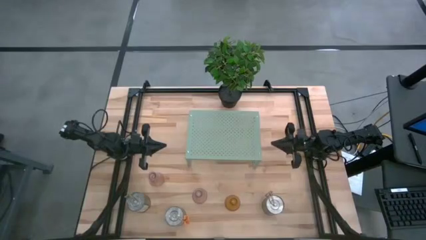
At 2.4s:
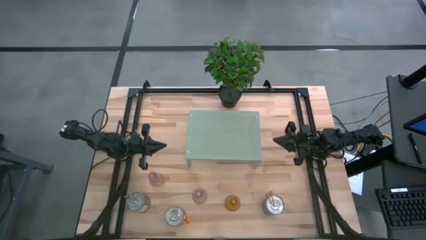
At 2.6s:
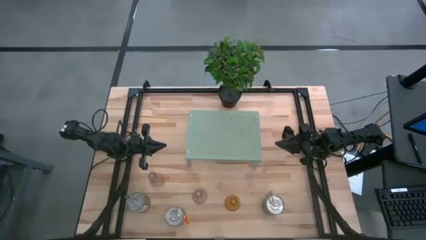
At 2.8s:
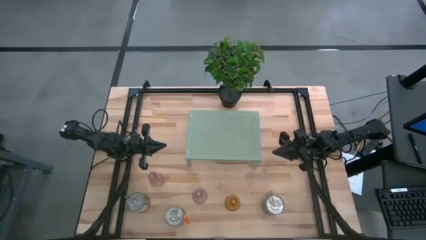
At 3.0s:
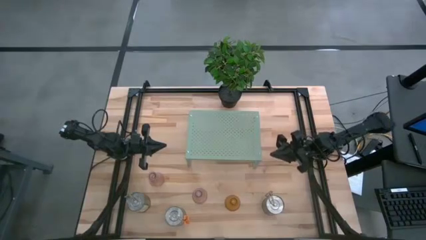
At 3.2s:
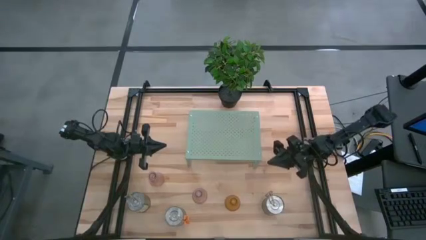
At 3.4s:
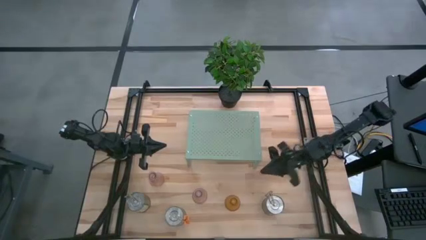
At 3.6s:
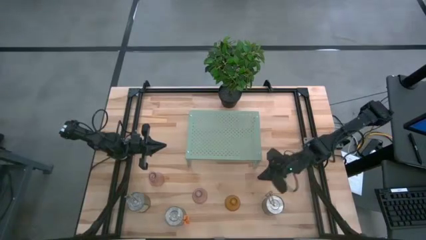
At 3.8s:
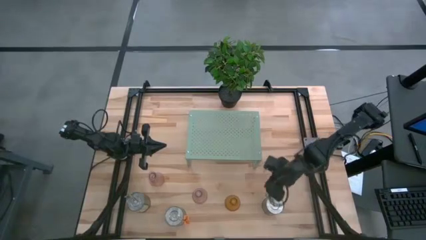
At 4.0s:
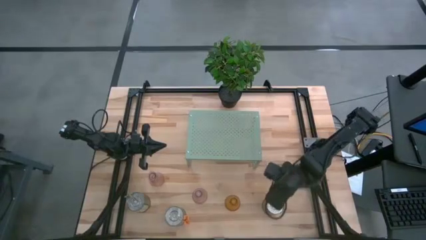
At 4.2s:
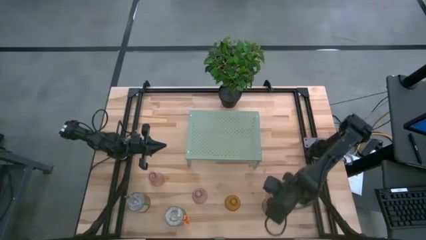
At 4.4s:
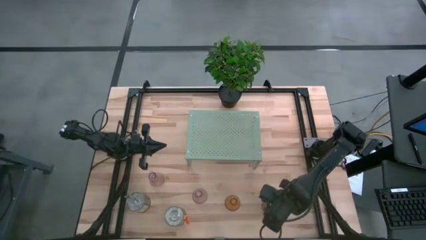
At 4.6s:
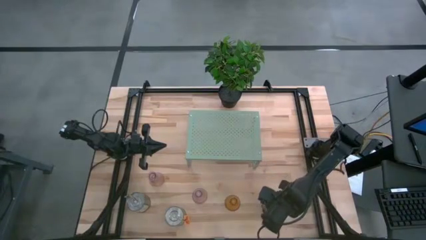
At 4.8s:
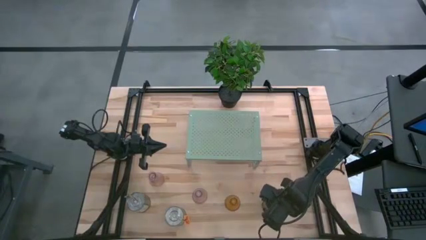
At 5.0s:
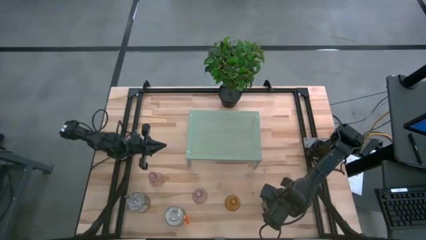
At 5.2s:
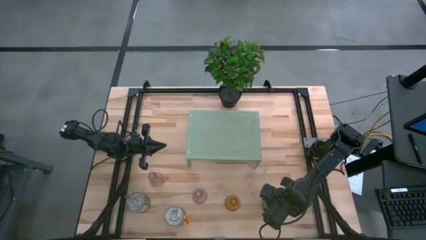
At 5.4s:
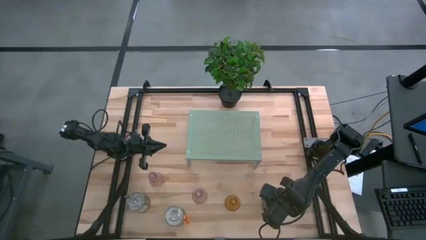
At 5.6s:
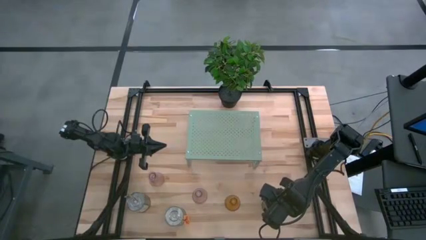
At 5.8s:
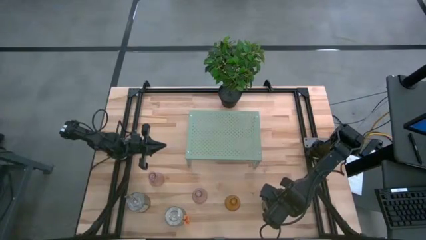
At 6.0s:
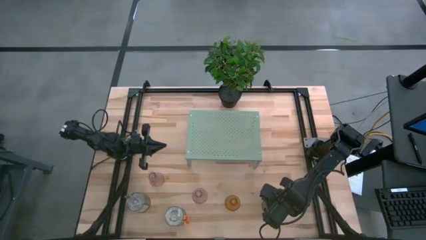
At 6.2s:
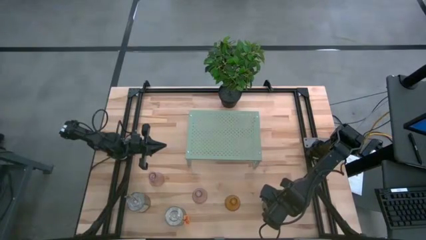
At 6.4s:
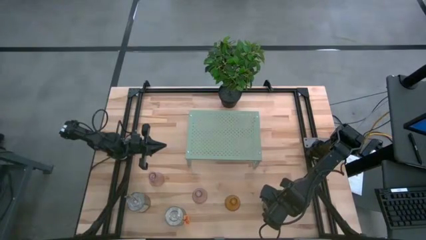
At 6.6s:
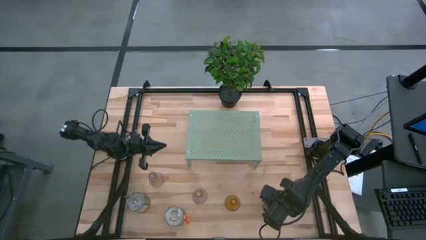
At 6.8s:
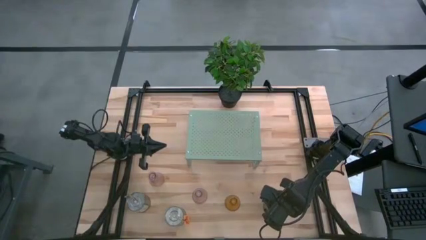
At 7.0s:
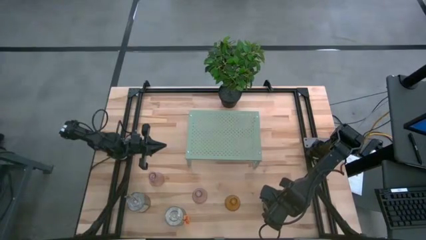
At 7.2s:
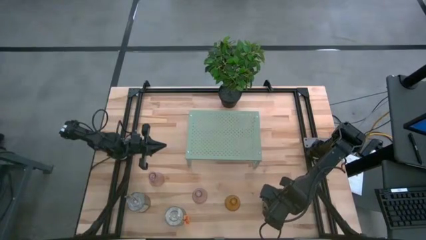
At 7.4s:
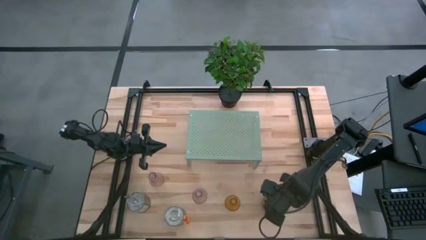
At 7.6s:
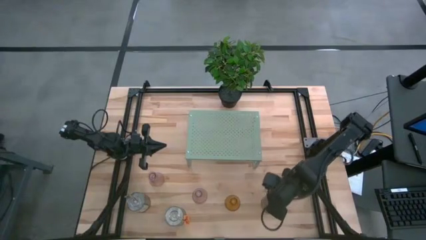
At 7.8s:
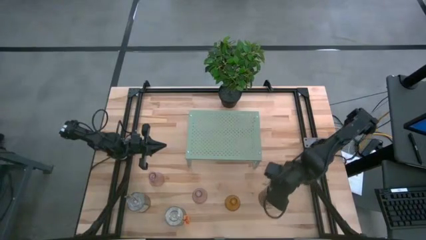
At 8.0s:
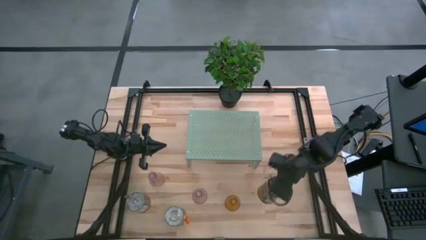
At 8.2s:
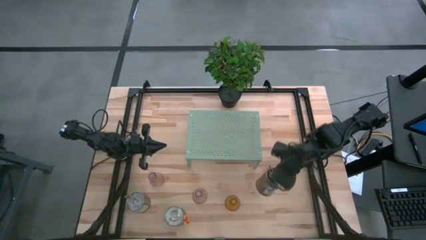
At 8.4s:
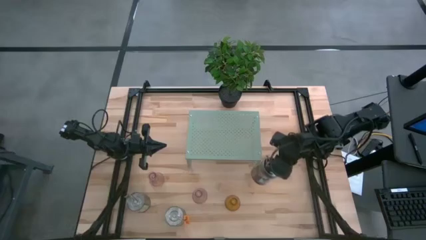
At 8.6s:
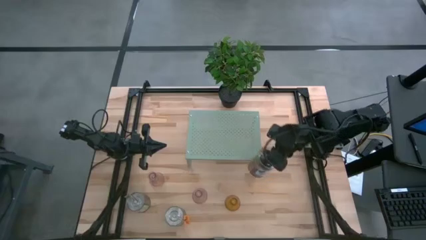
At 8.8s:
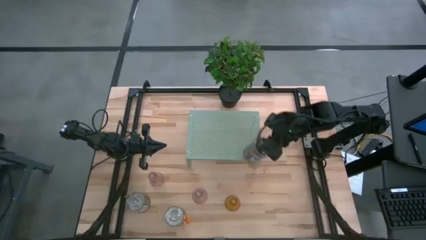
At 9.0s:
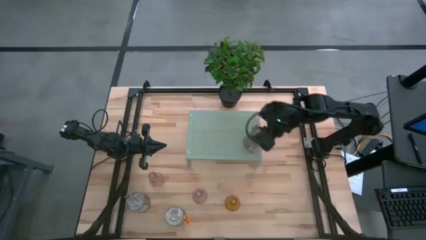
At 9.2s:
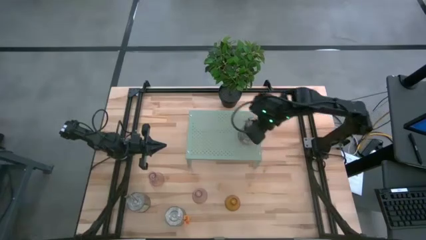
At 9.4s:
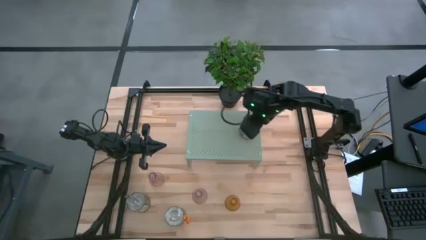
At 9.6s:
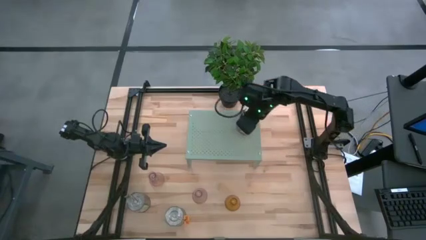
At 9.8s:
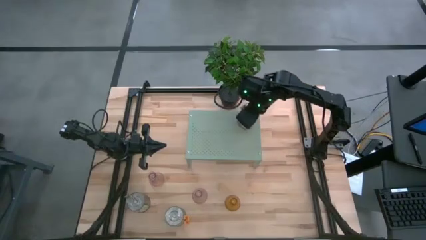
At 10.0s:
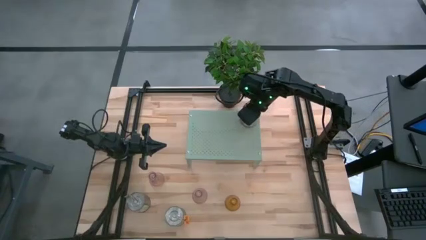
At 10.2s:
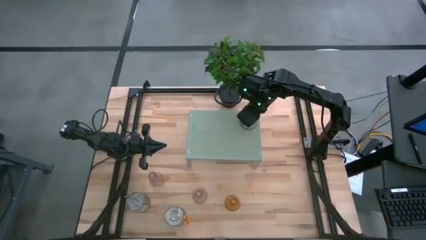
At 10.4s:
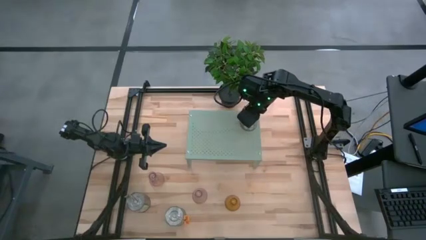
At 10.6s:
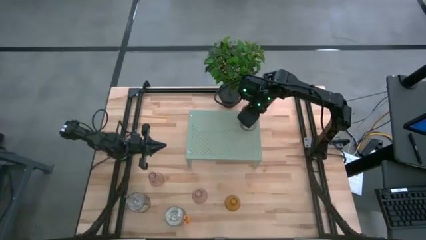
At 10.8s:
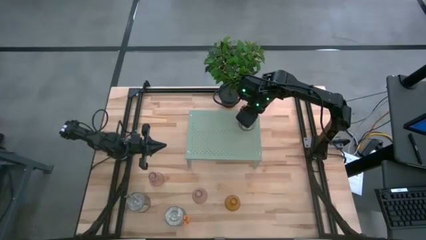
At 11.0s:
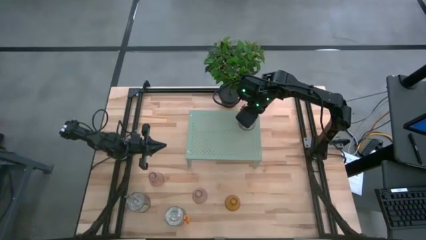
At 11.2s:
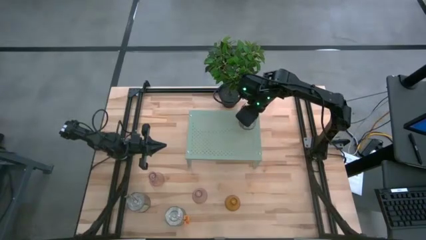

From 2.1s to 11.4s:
Task: Pick & Place candle stick holders
Put the right silver candle on the shelf

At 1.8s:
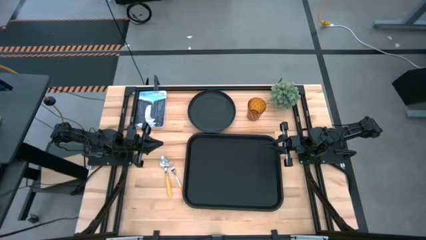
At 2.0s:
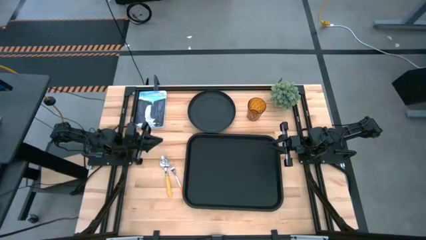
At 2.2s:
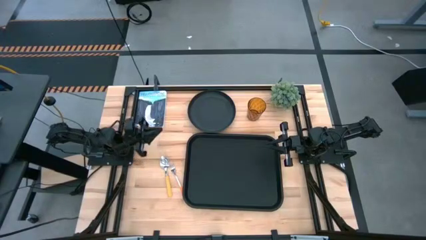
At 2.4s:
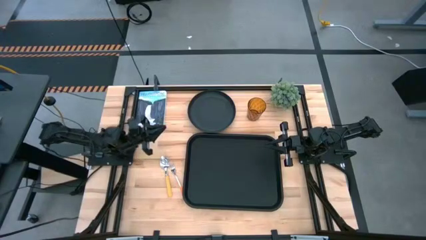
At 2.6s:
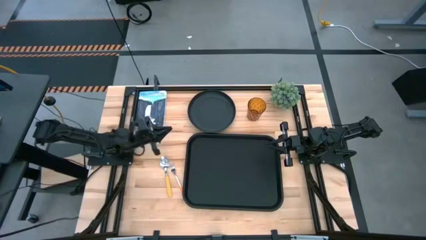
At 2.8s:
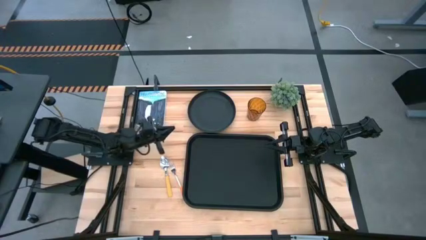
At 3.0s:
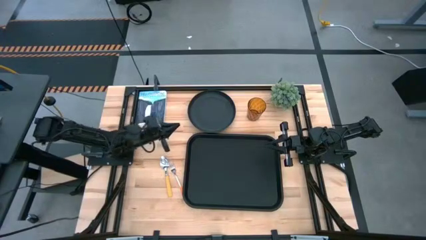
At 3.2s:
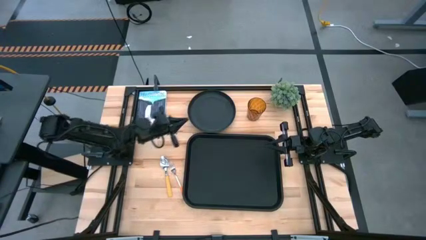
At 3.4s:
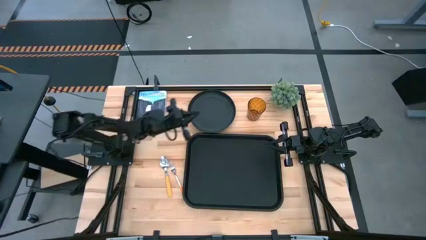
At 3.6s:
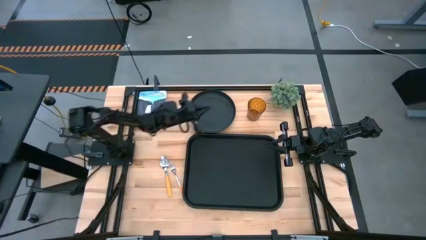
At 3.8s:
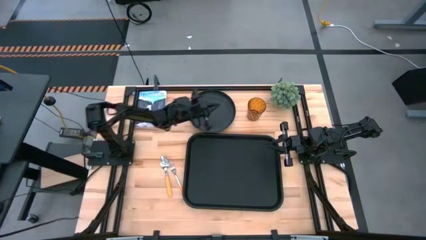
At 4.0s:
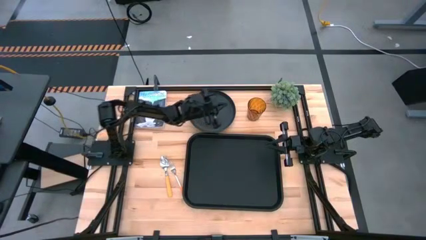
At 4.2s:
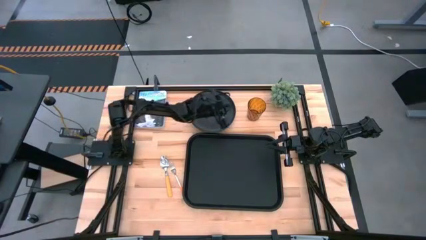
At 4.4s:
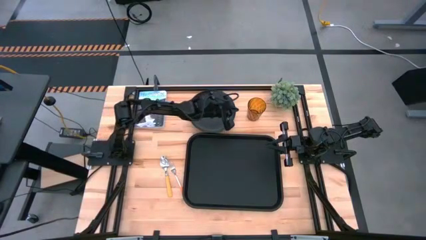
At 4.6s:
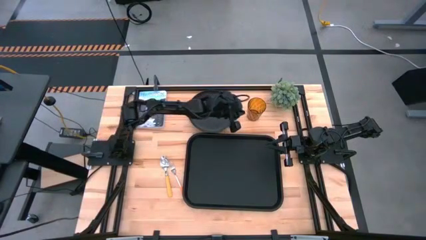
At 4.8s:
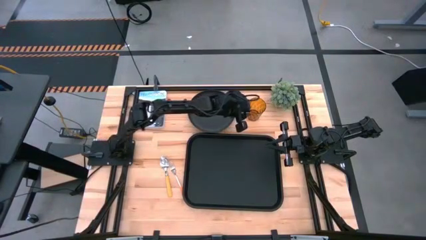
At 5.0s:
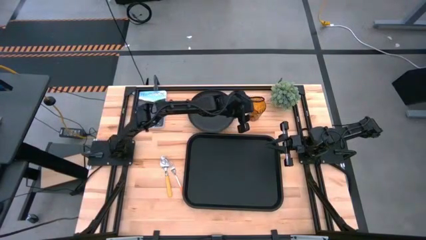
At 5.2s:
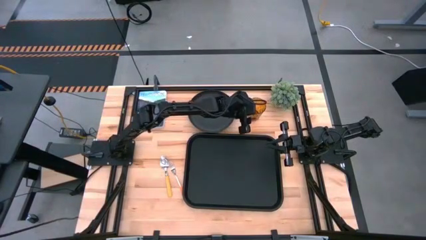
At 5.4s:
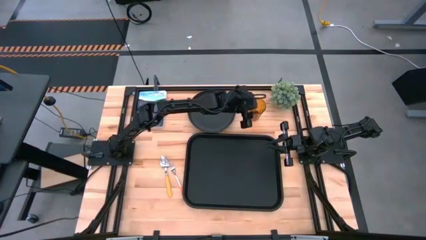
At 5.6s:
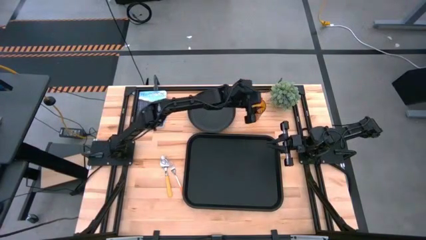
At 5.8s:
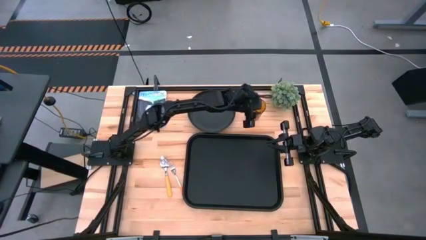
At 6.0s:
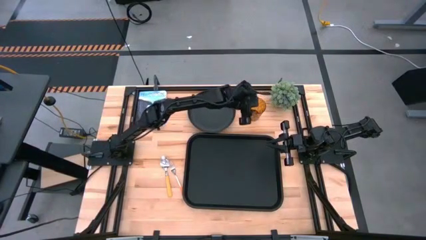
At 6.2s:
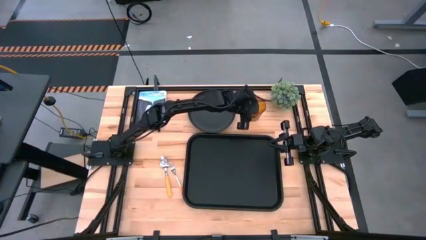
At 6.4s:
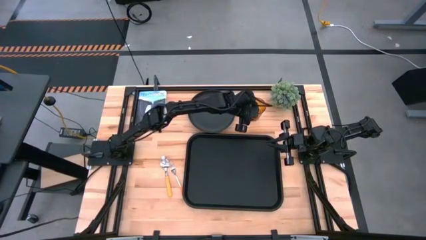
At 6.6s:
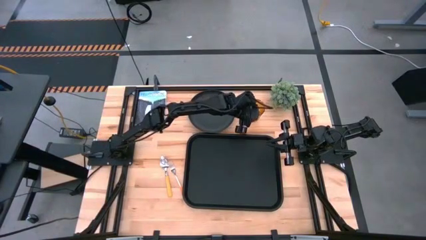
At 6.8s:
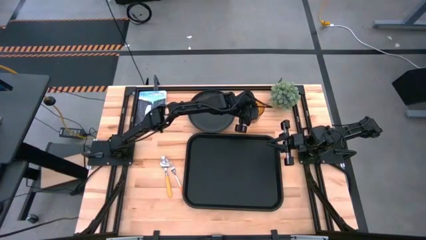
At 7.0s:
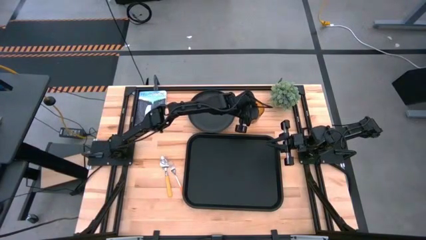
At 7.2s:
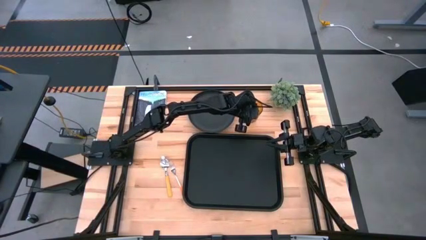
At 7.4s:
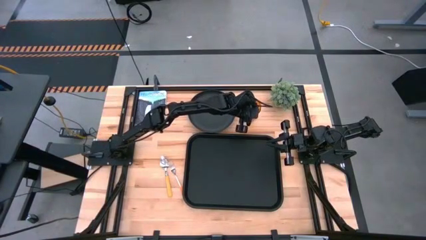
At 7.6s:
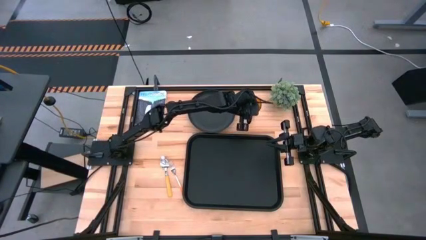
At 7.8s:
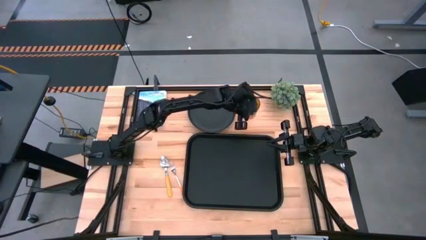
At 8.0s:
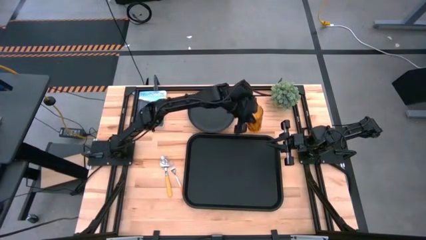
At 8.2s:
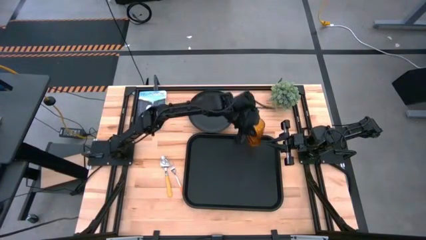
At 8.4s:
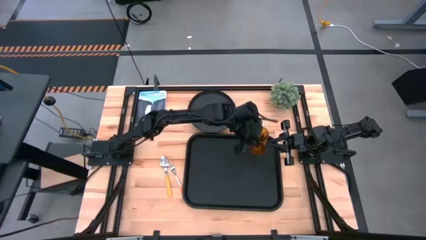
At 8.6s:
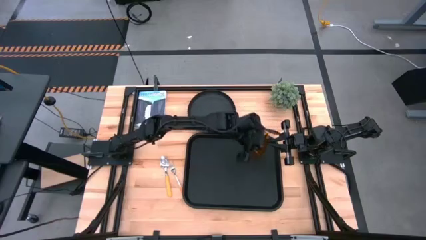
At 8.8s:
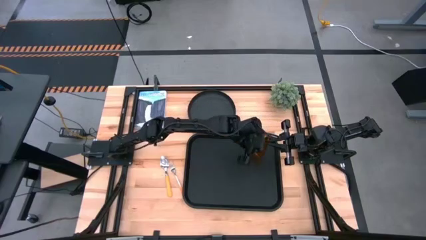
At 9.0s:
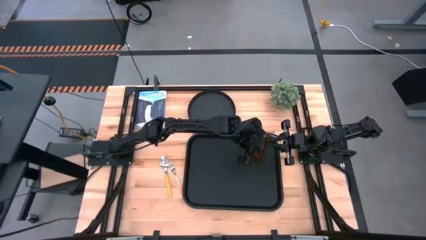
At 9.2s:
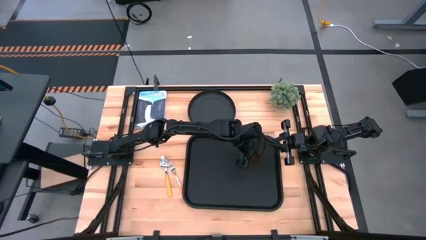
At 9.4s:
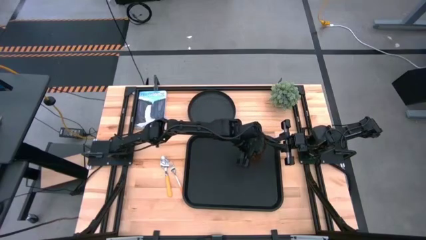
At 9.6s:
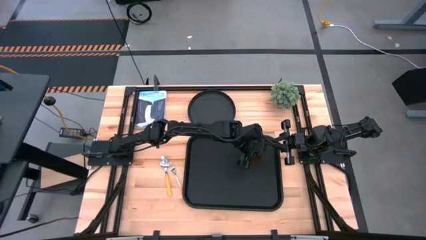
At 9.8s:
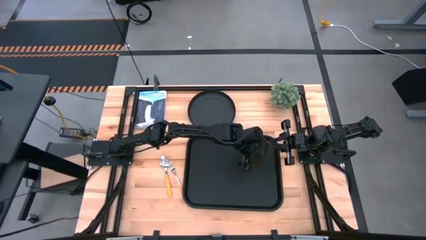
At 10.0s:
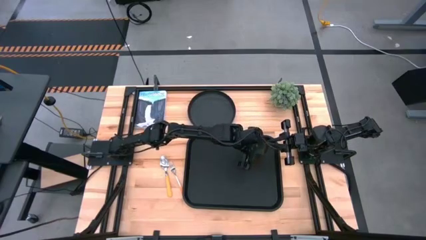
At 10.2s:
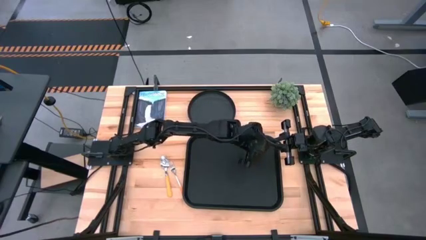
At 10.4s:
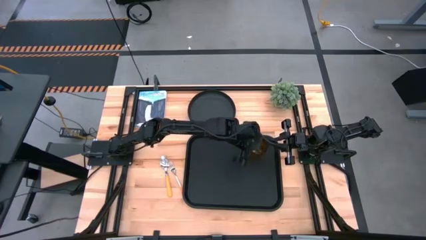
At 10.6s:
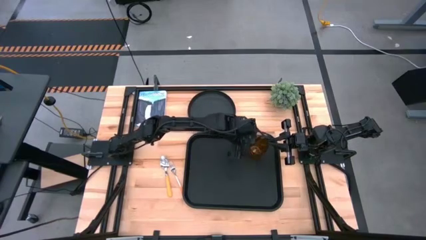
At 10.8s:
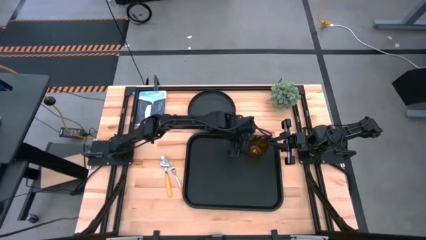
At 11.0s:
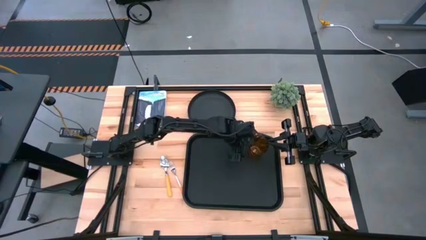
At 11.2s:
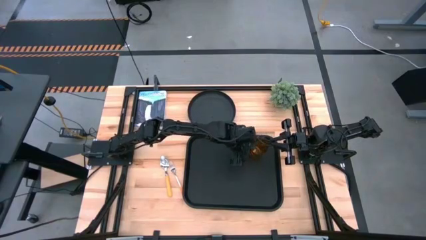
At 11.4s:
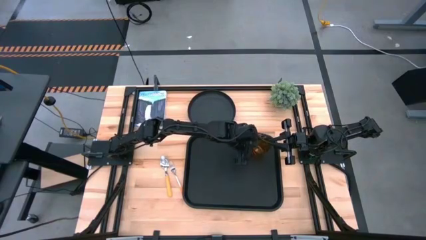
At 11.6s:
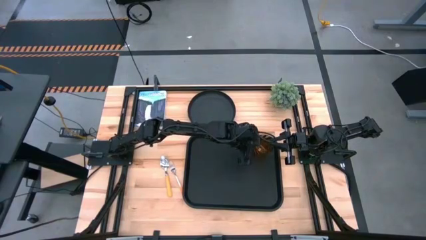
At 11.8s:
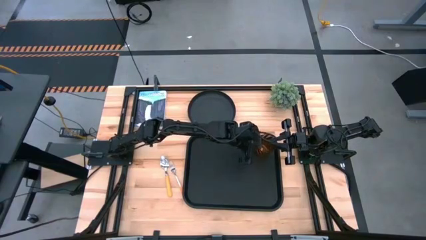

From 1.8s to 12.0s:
Task: Pick and place plate/cup/fork/spoon on tray
Put the yellow glass cup on the black serving tray
